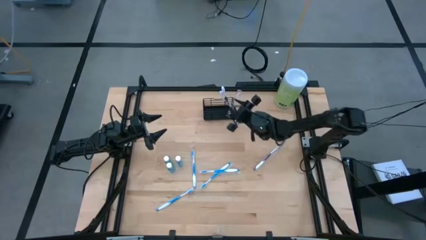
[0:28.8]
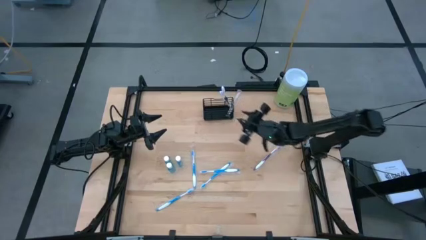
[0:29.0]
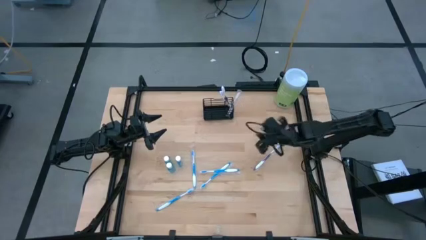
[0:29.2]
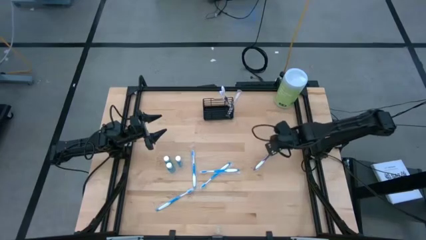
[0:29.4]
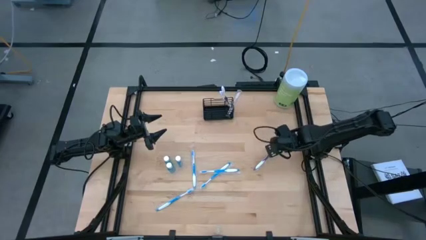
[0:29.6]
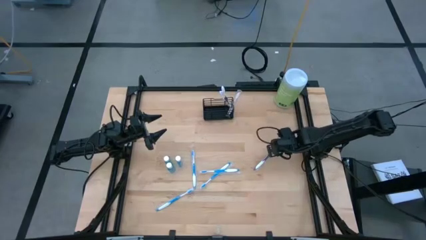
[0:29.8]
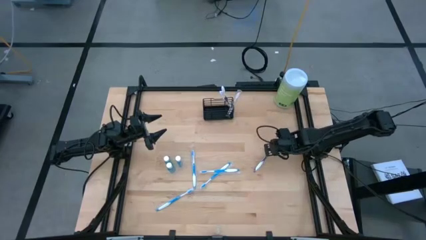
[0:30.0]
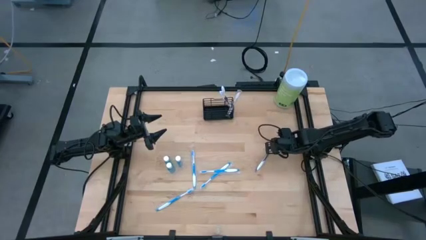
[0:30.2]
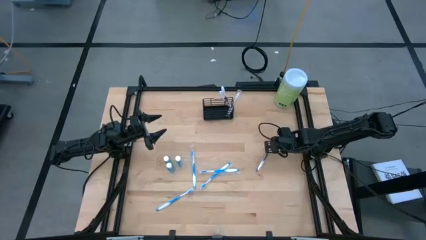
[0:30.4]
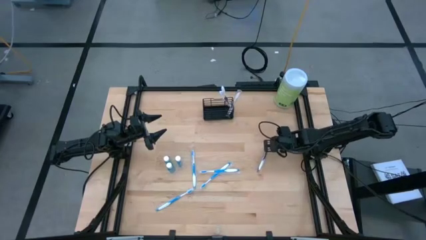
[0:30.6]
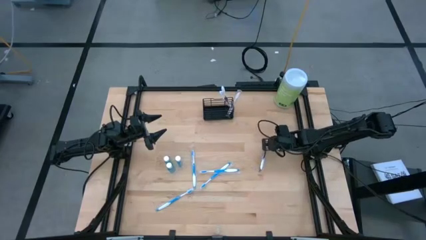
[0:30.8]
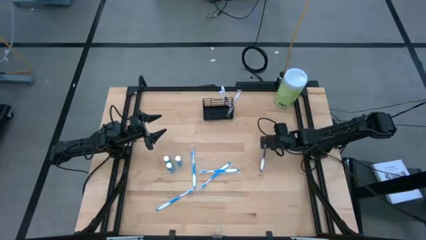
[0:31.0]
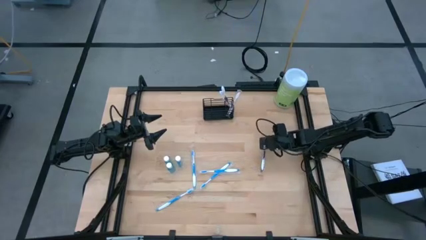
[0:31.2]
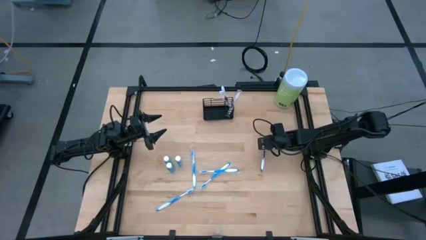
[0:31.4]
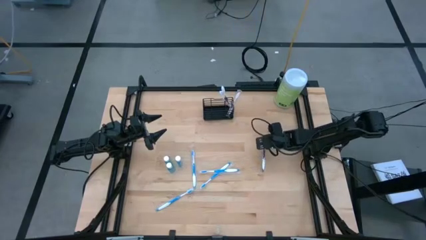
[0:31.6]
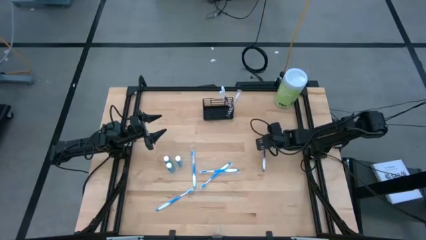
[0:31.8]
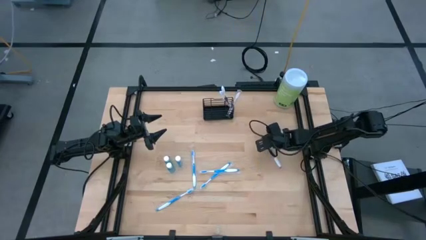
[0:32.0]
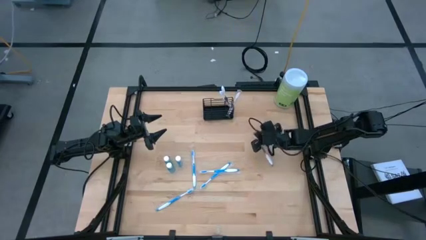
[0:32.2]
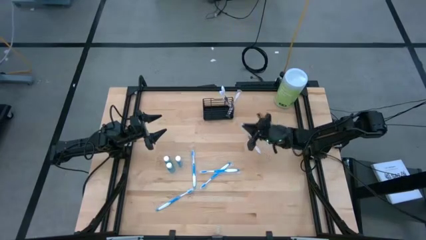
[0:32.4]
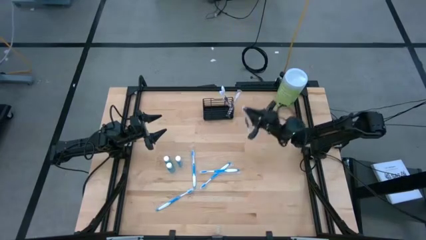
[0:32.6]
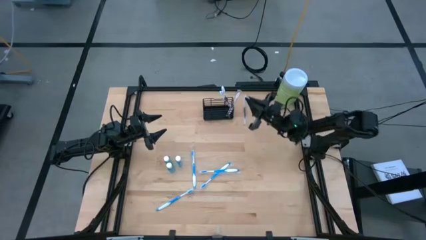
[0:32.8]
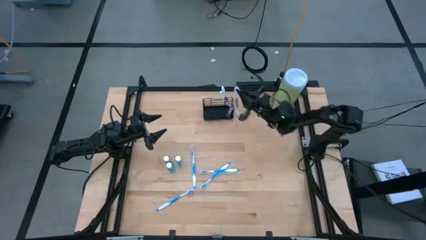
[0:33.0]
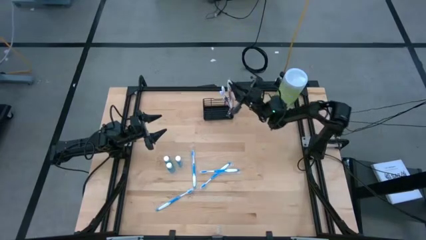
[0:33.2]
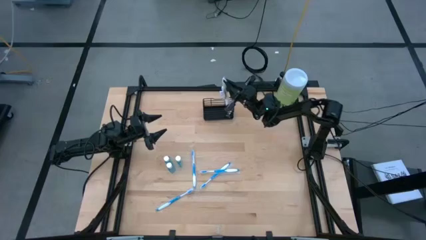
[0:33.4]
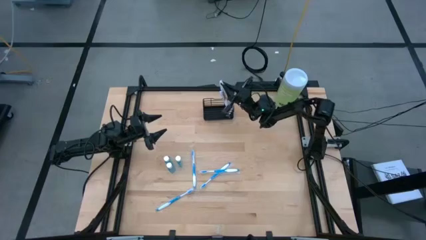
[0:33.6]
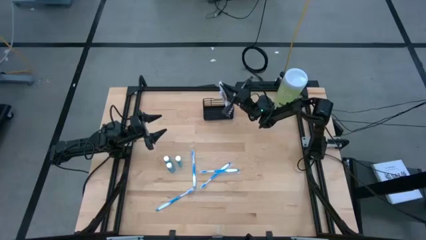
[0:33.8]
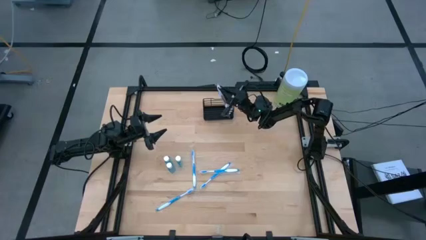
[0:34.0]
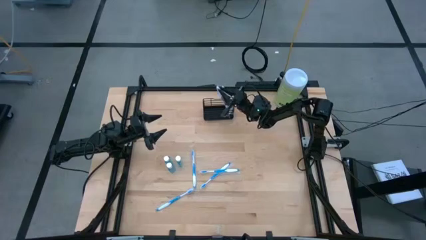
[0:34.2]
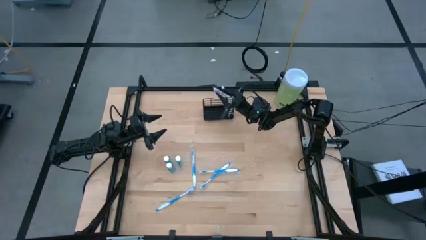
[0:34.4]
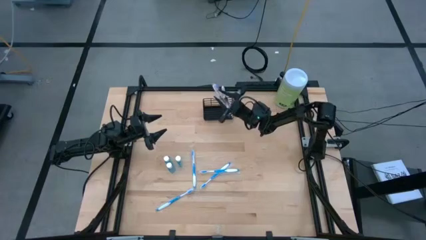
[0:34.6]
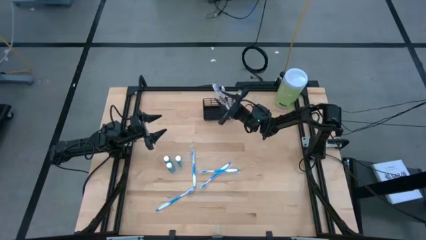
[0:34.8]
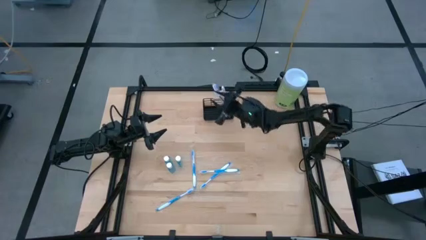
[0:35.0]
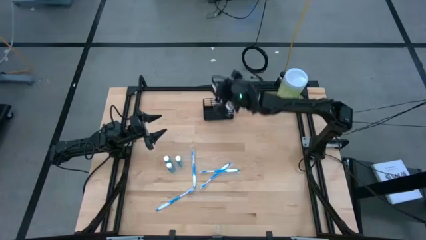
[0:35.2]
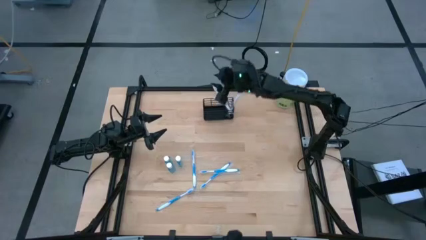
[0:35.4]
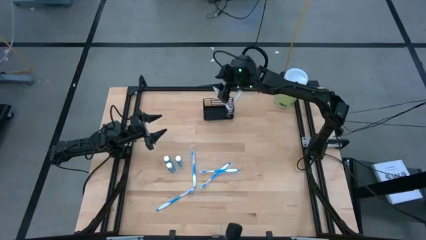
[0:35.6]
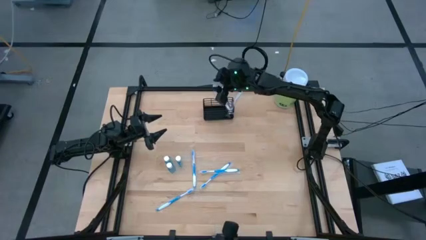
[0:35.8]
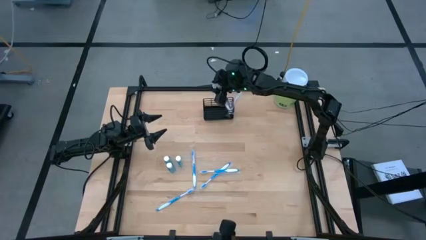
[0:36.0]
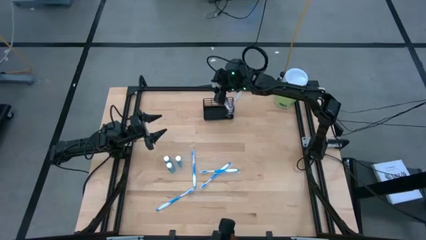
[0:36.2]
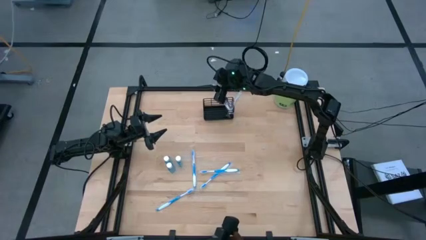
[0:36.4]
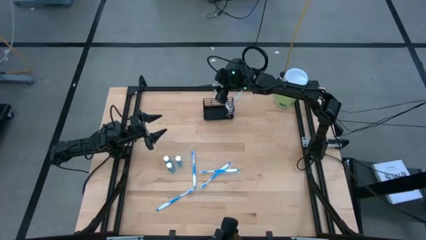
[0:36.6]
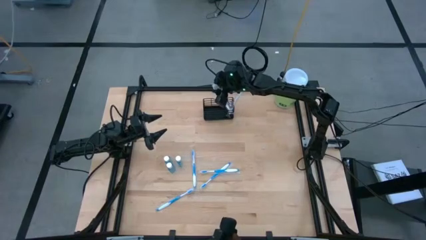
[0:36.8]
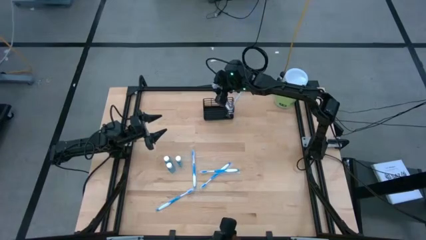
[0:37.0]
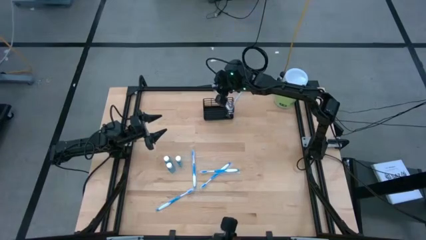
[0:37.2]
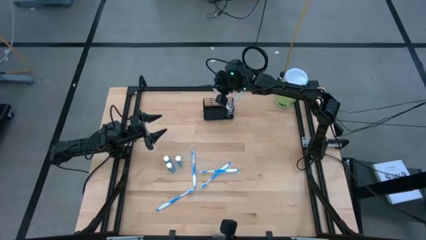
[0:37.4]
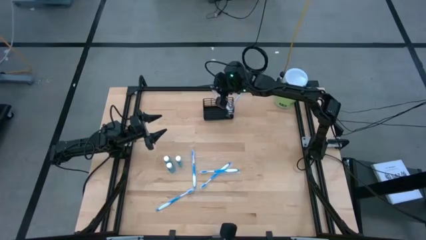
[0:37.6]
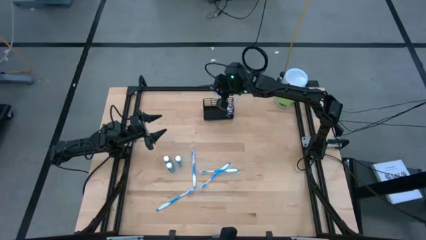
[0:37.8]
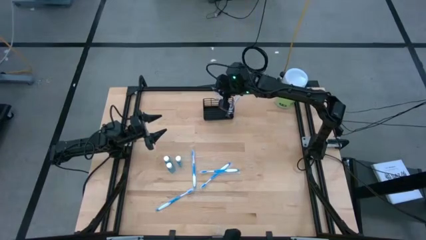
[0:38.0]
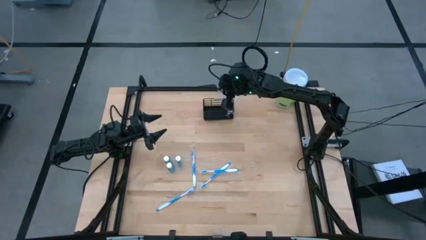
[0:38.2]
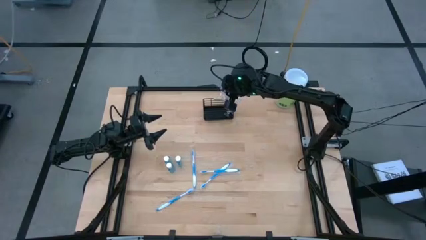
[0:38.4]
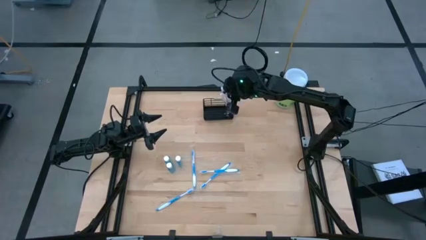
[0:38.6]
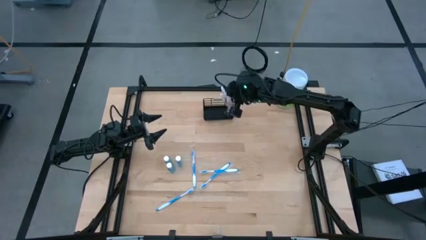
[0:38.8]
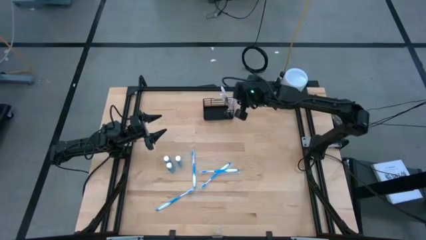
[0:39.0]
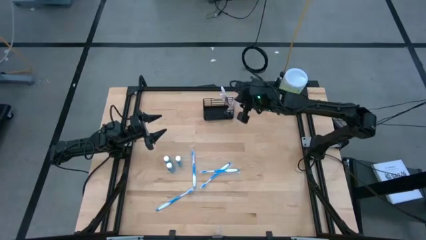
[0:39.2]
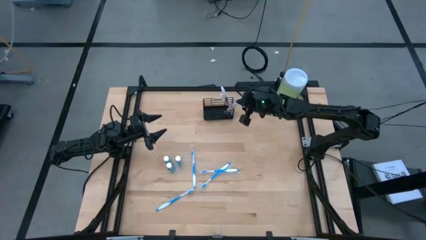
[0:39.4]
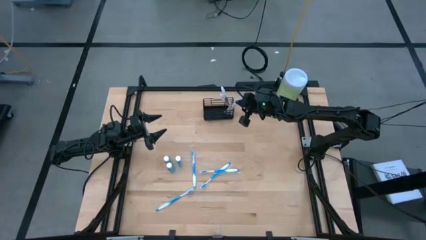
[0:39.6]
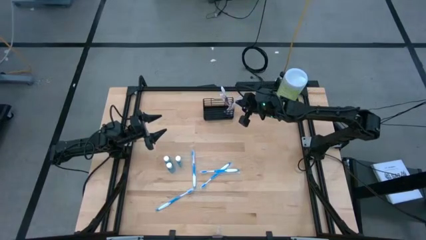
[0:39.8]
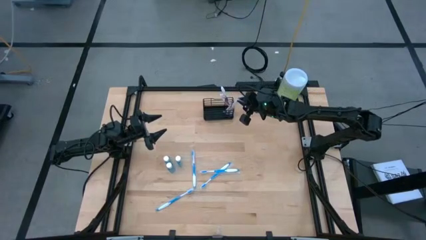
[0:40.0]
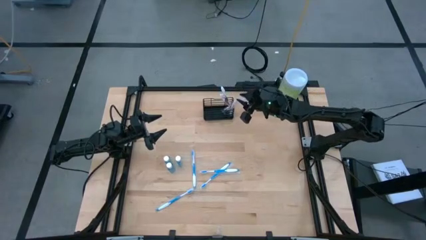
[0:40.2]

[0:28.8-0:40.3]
Task: Pick & Place toothbrushing station
Put the violet toothbrush into the right compartment of the wire organizer

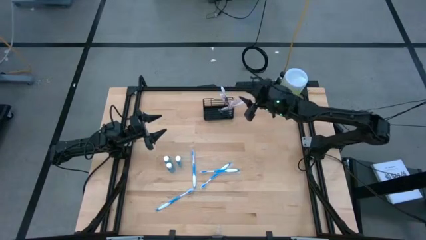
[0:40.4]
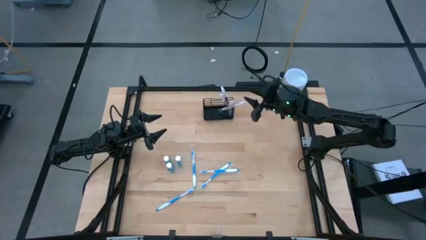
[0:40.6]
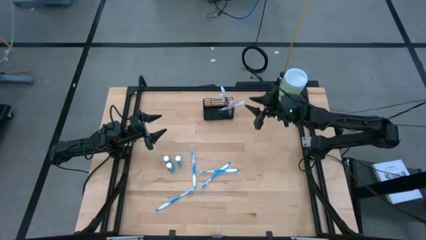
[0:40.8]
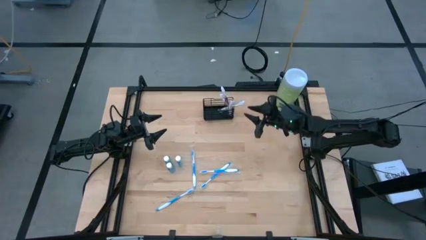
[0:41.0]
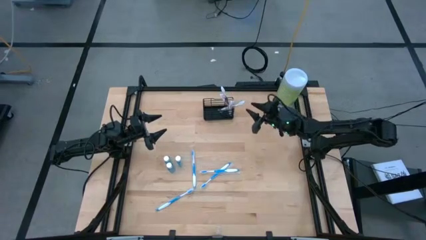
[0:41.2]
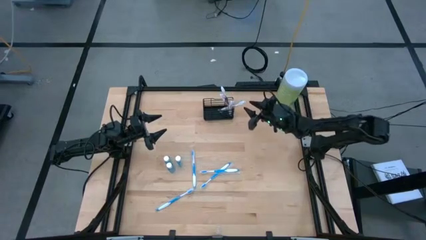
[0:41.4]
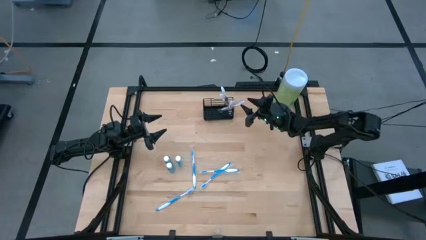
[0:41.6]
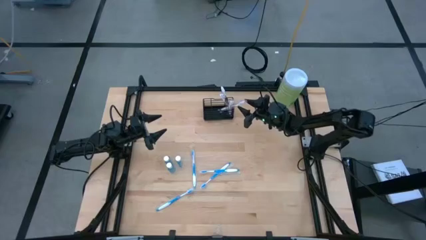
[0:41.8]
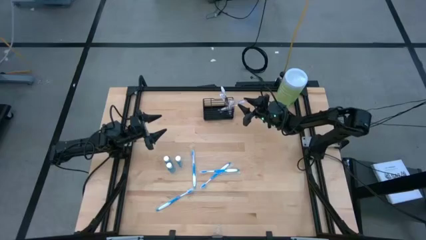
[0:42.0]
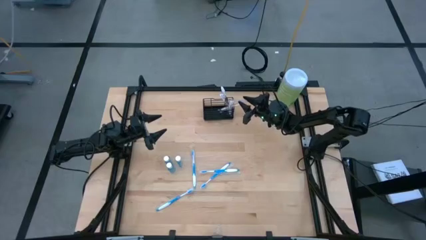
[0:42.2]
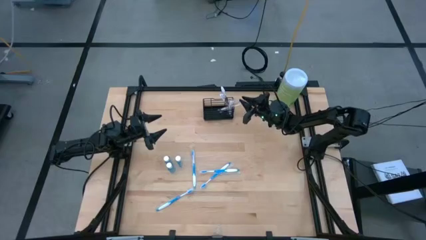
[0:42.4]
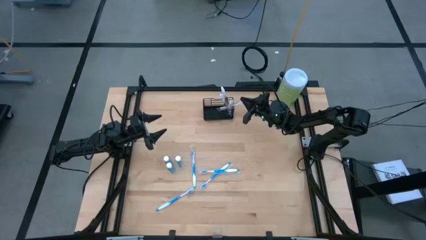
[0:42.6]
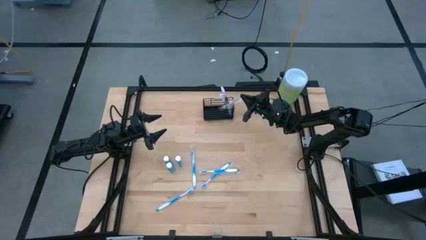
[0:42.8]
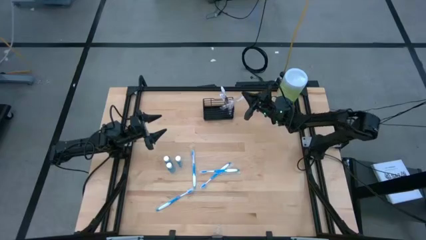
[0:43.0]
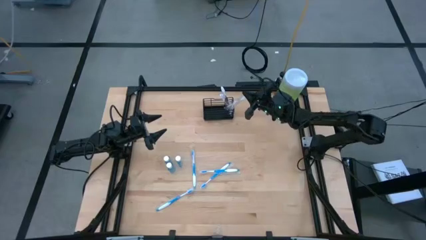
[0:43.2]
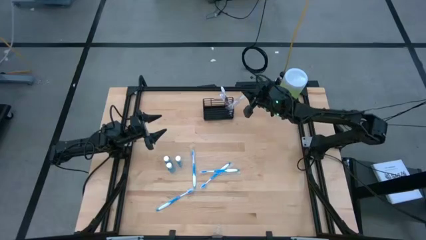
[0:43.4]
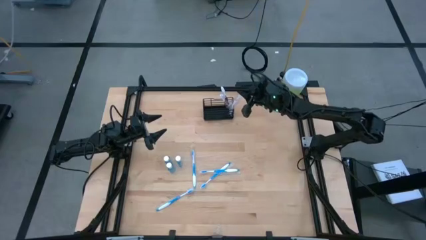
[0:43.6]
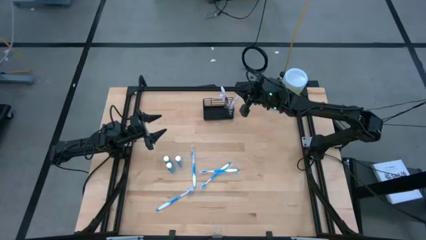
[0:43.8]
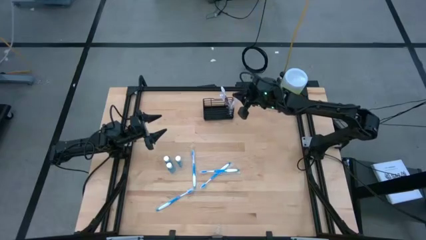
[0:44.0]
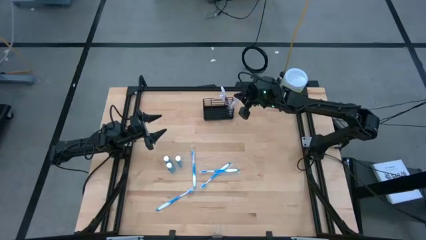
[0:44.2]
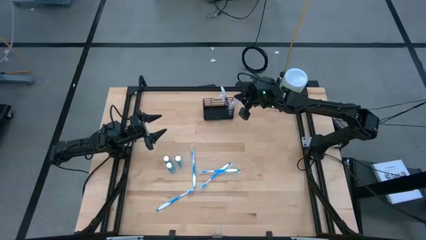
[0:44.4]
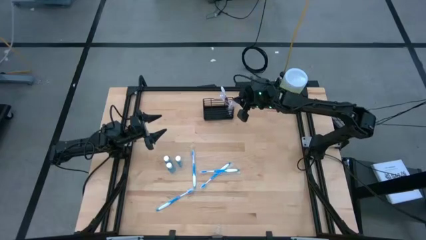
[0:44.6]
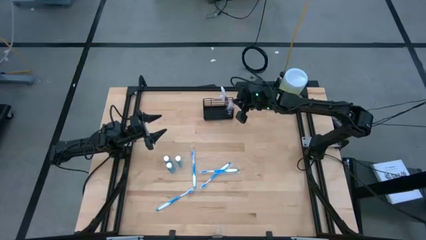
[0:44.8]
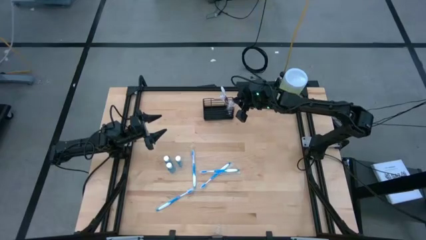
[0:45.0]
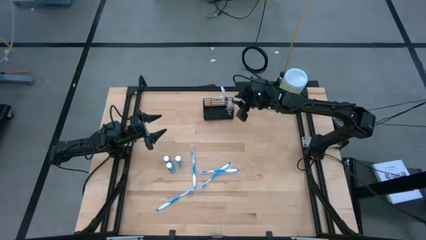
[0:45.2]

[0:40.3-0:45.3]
Adjust the violet toothbrush

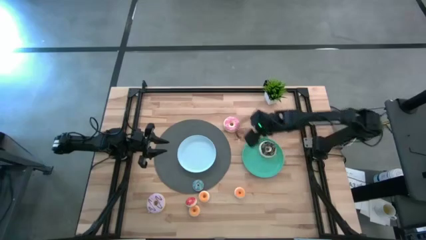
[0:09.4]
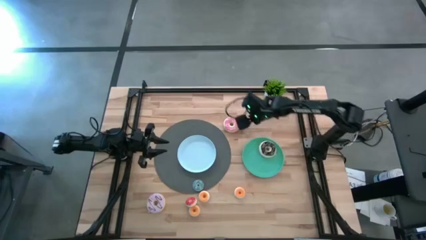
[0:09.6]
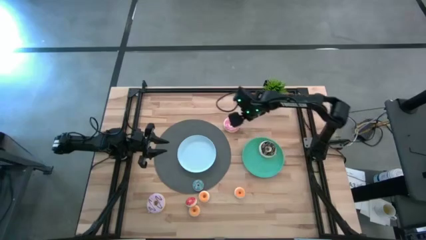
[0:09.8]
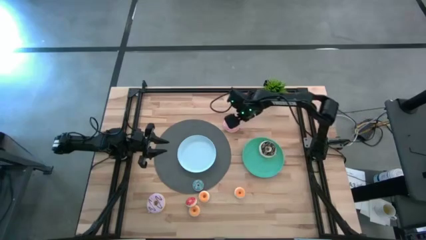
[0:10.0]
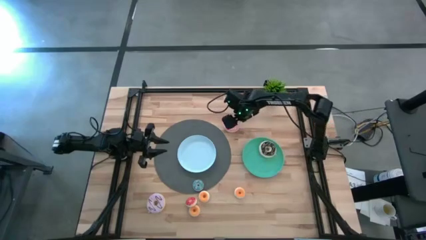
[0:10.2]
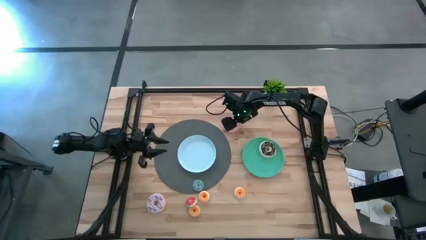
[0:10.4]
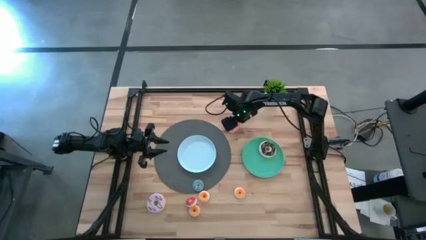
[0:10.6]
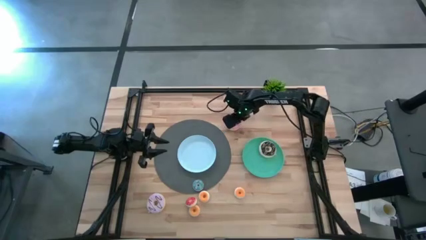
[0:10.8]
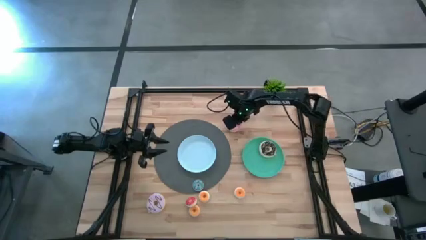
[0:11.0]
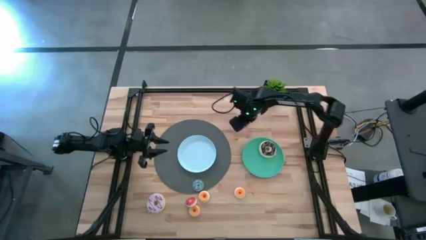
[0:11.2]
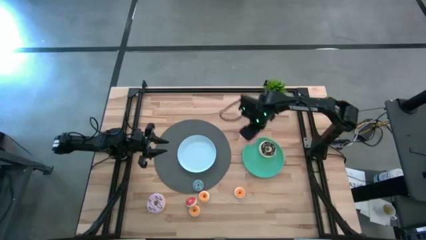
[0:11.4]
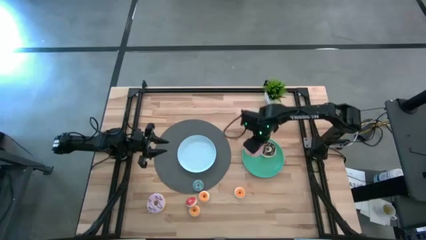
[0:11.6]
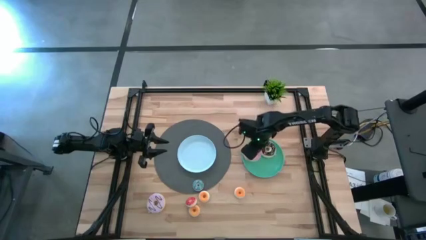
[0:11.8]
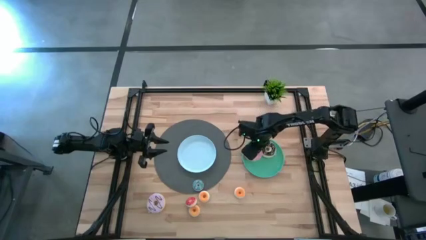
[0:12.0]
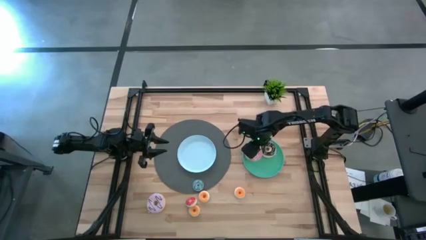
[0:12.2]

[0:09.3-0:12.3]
Task: Pick & Place donuts
Put the big pink donut on the blue and green plate
